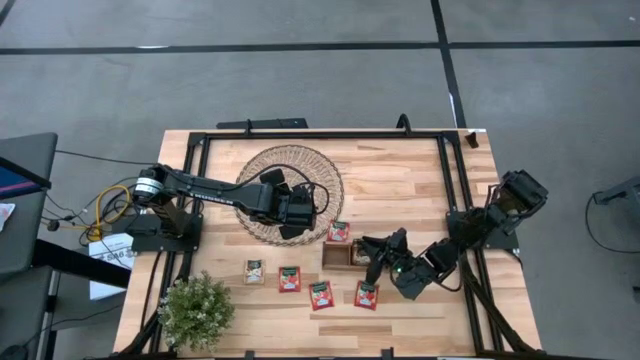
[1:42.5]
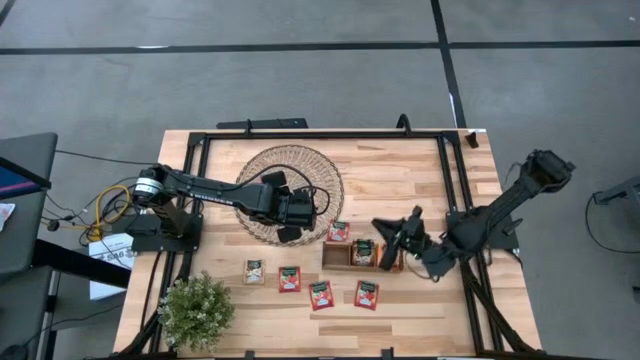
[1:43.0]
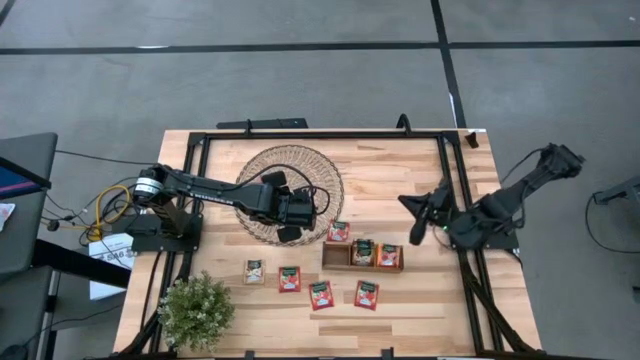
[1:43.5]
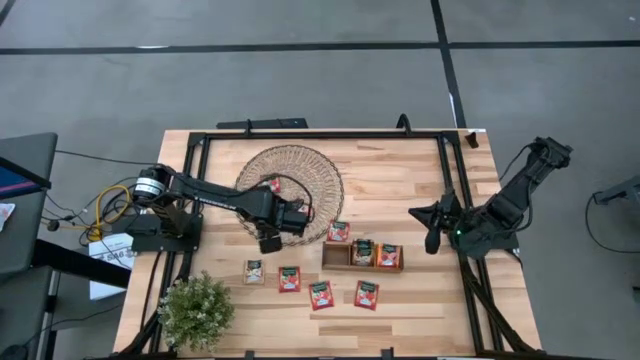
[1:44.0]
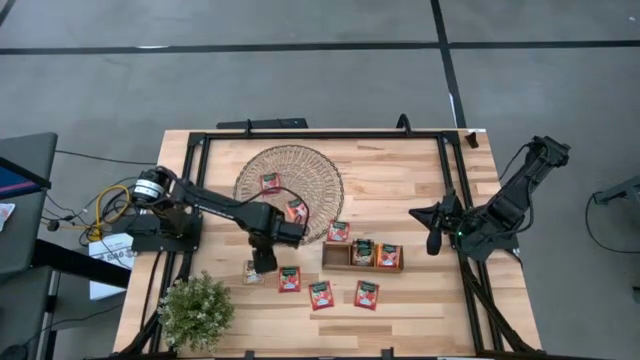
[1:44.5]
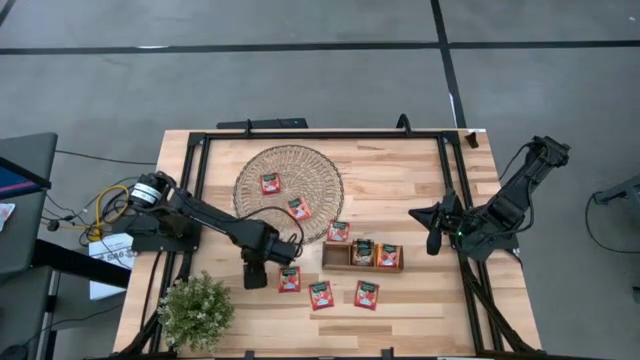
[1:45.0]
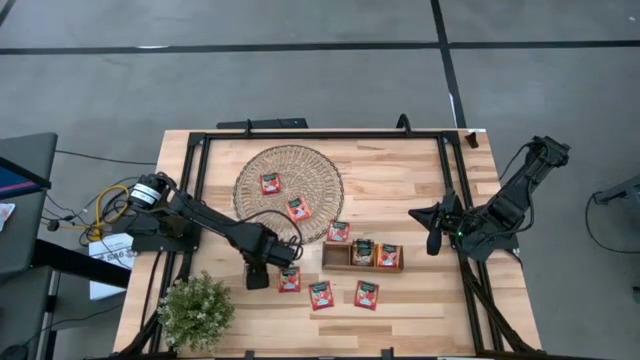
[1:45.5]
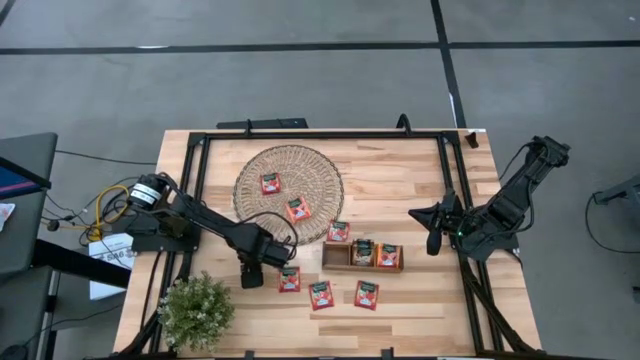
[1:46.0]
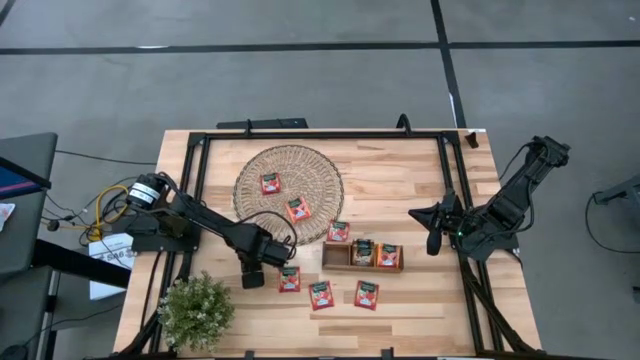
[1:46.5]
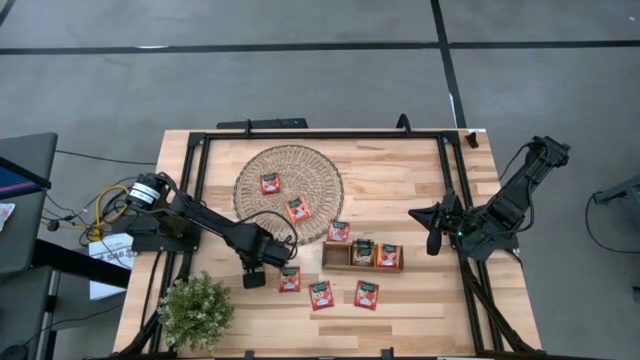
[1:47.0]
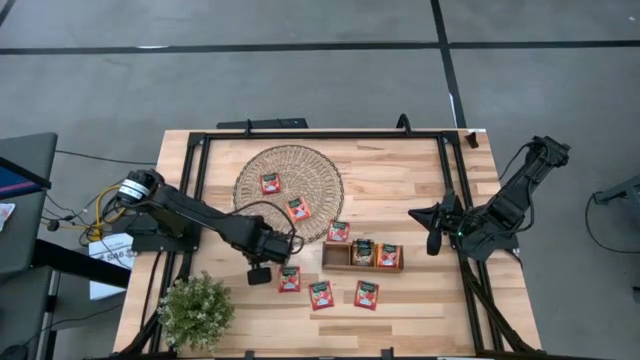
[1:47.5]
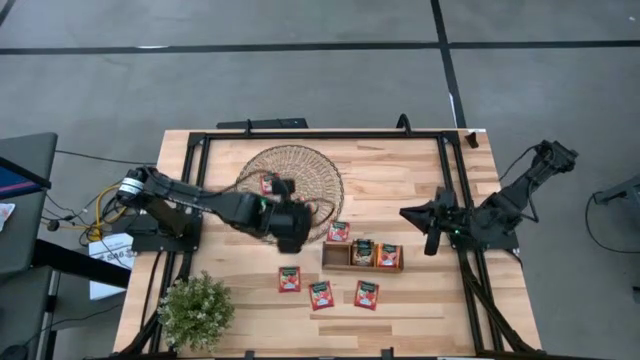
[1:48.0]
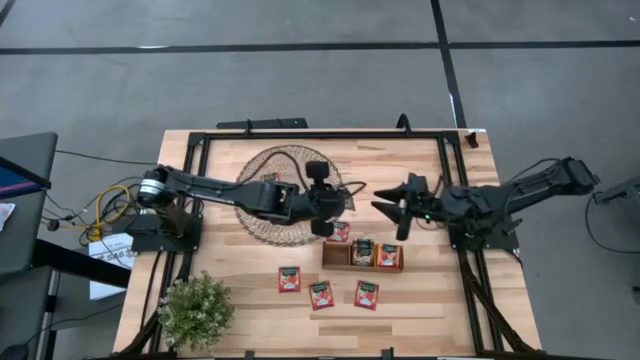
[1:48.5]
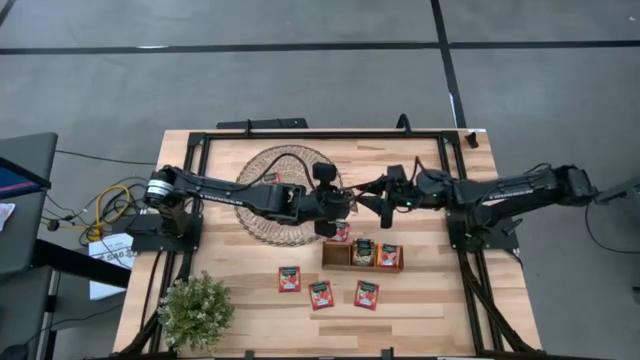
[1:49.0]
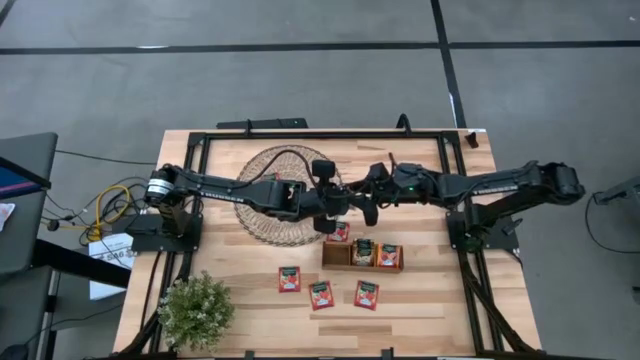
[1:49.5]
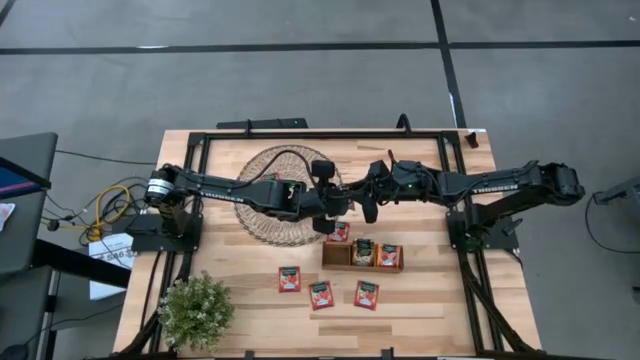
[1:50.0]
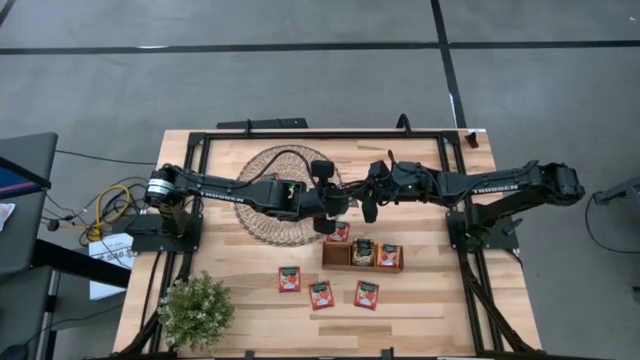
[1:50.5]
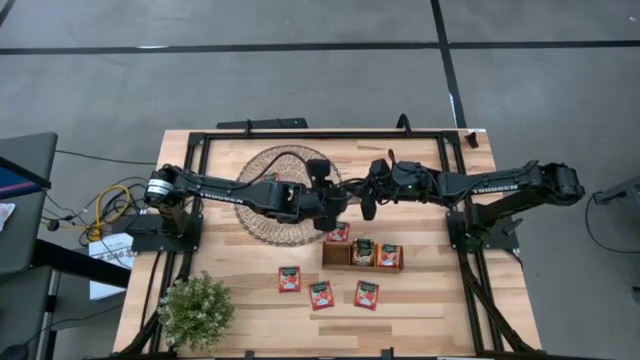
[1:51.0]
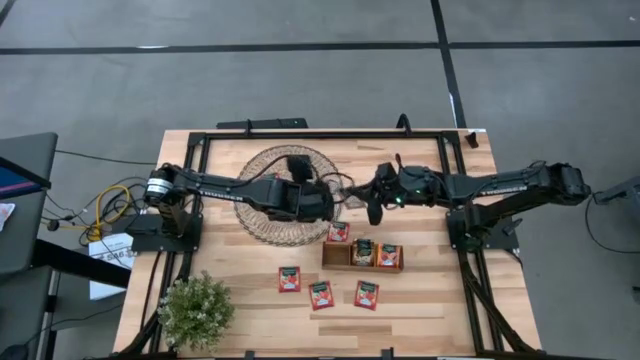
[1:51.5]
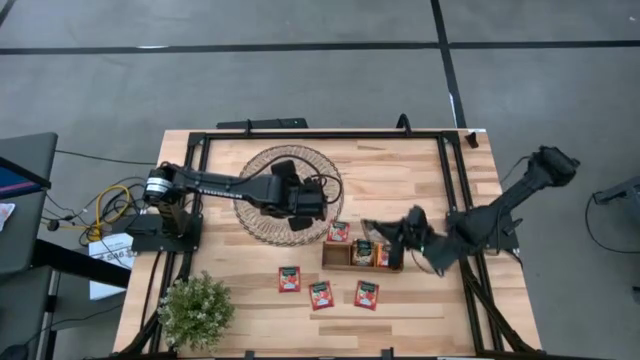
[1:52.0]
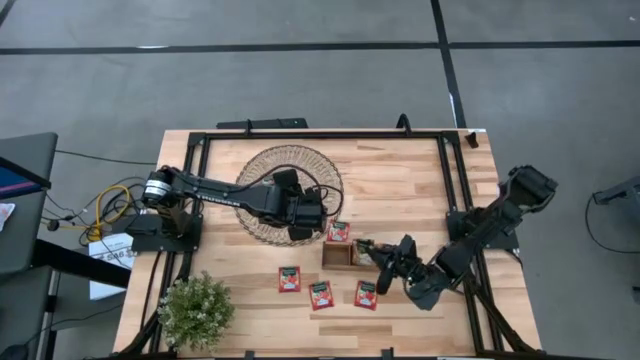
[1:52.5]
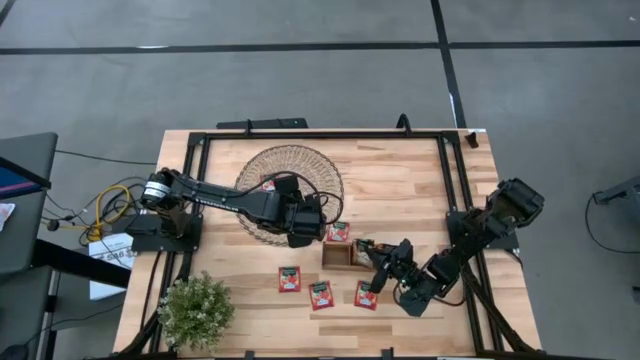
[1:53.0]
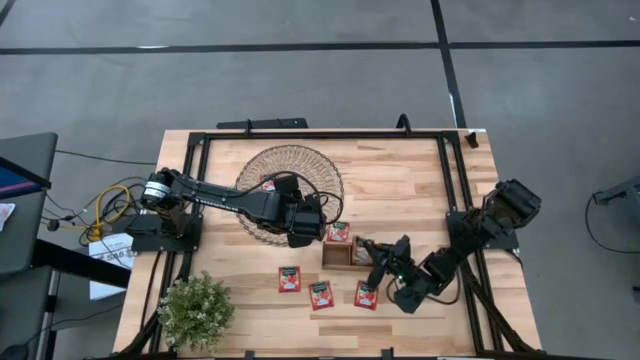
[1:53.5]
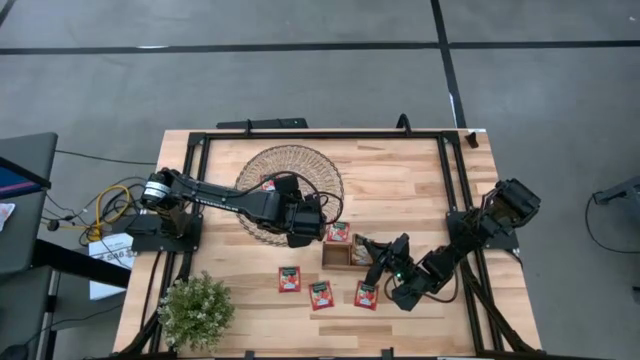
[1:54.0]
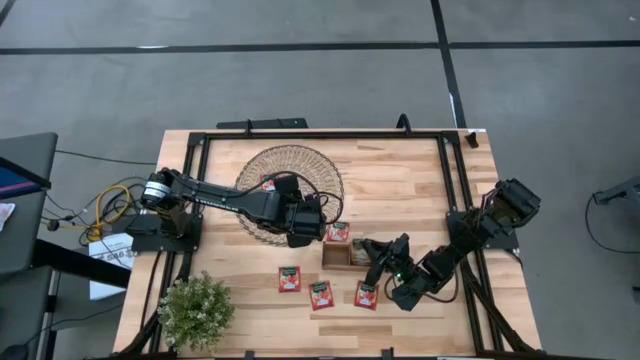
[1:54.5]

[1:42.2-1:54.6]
Task: Pick & Place Tea
Put the brown tea bag into the middle section of the wooden organizer
